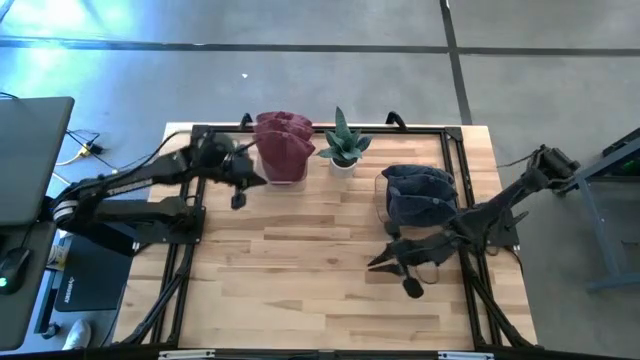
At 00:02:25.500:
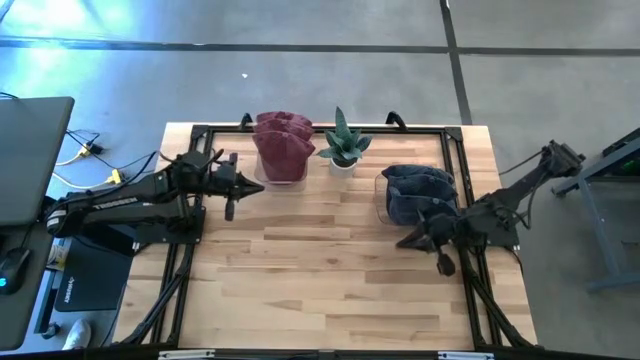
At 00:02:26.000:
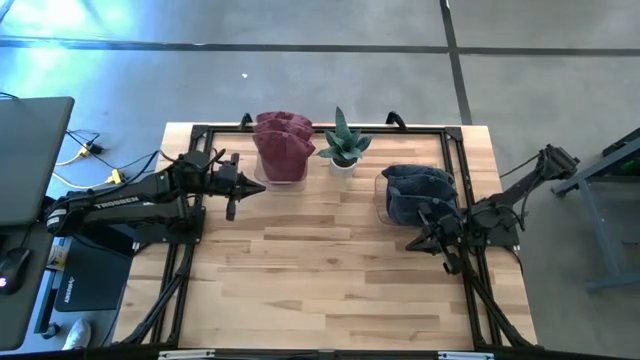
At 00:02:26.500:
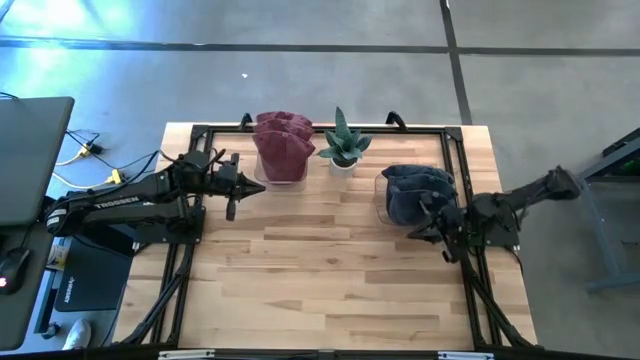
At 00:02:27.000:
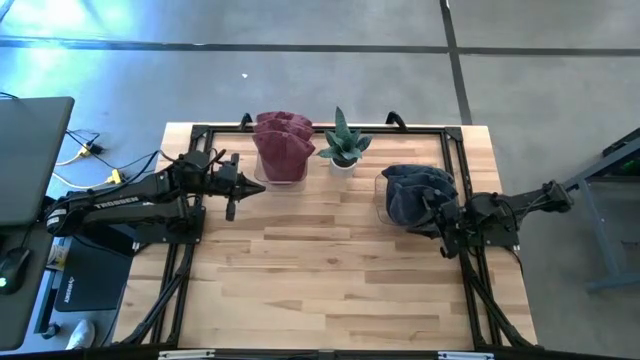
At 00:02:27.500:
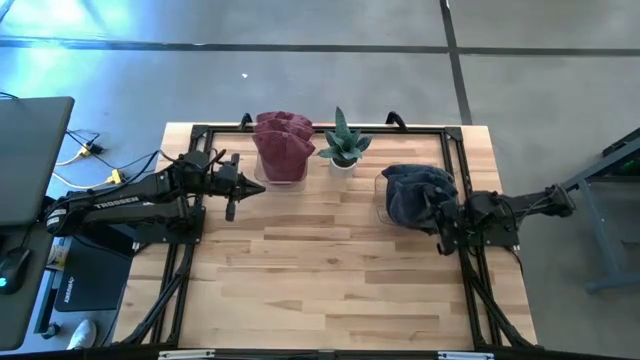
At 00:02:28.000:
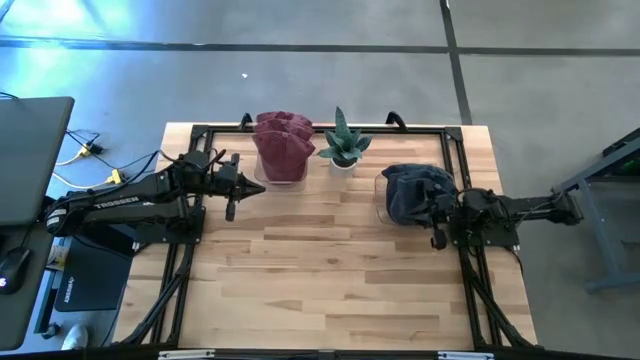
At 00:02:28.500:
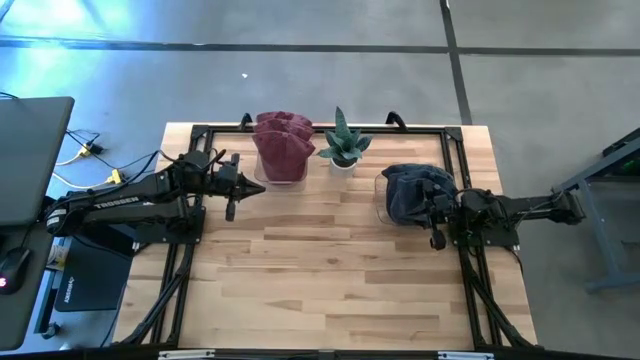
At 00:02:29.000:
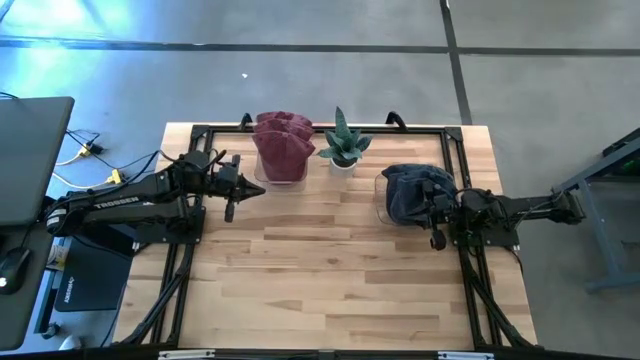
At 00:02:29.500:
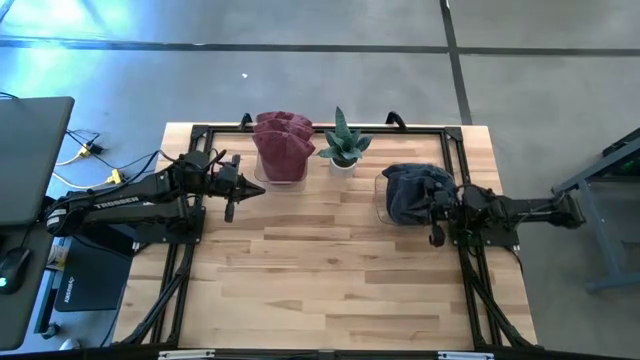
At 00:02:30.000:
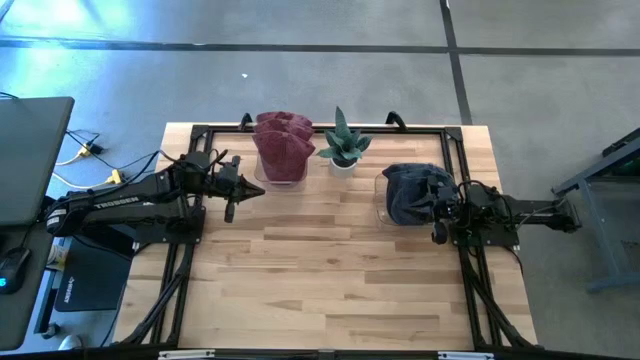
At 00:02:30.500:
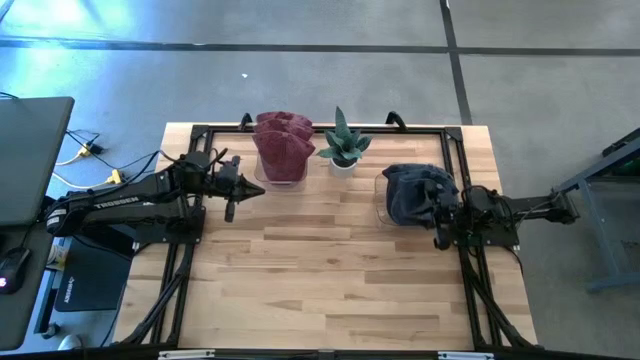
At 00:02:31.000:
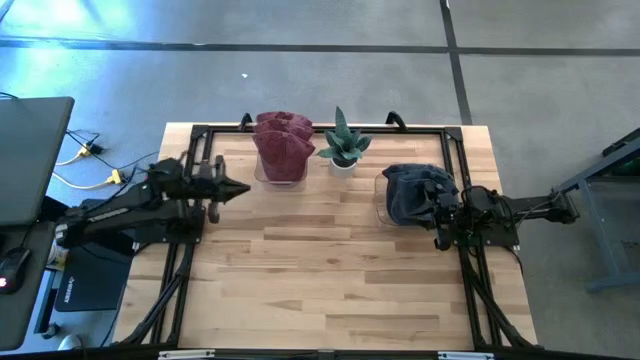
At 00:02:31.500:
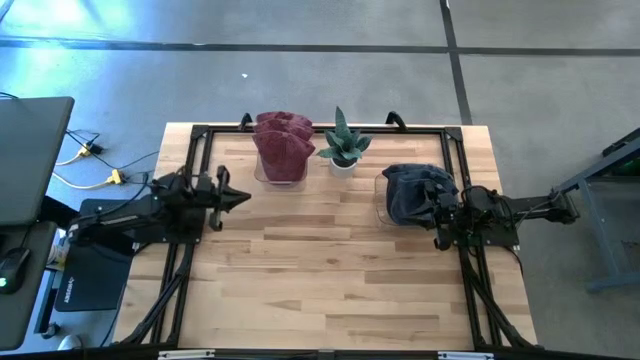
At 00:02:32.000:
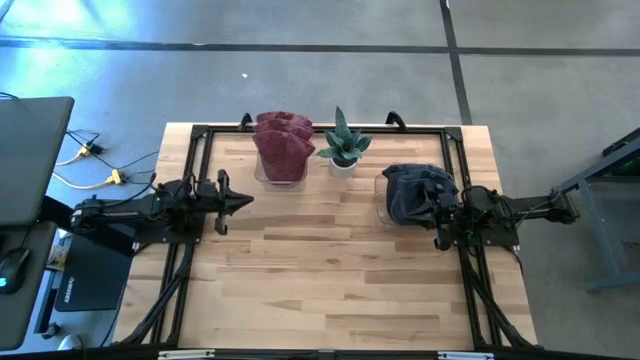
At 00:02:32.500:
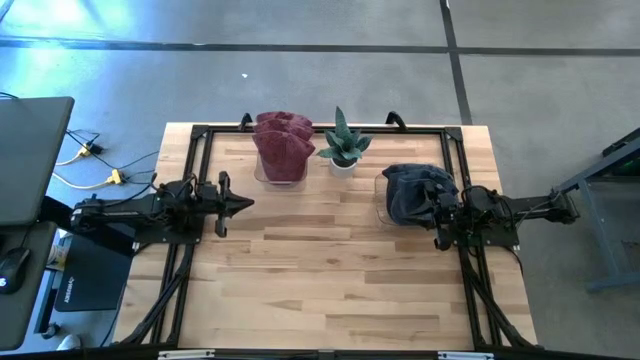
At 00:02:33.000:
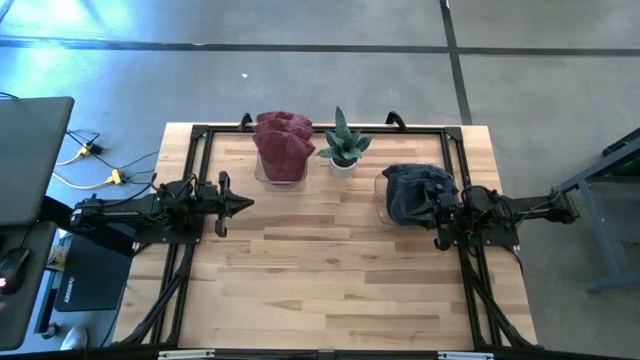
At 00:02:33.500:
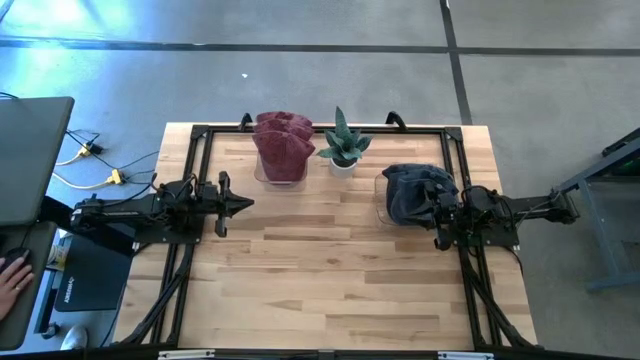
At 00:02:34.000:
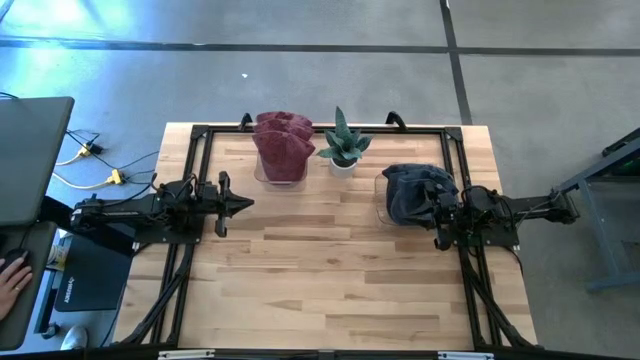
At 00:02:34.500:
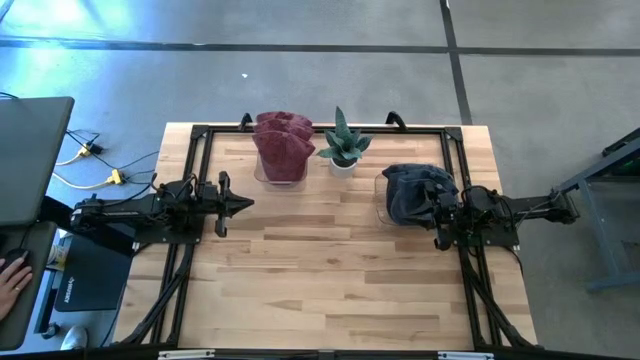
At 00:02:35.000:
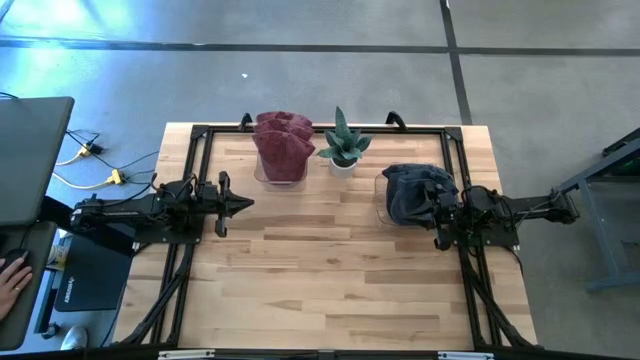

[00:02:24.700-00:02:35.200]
Task: Pick & Place hat
Return to home position
